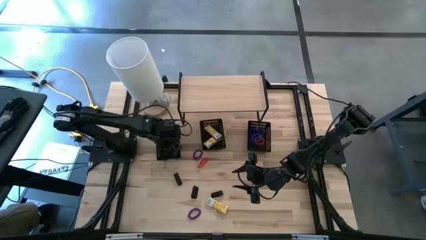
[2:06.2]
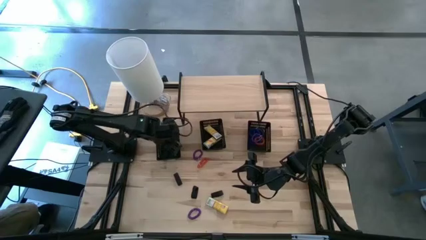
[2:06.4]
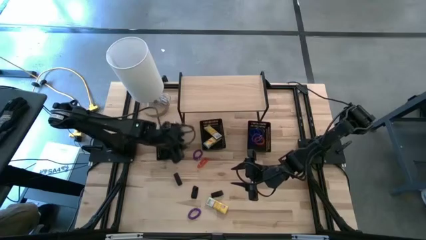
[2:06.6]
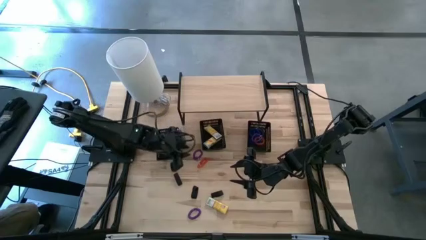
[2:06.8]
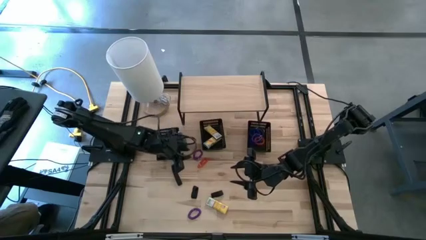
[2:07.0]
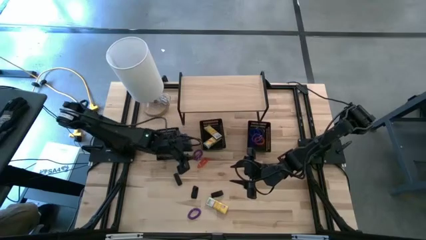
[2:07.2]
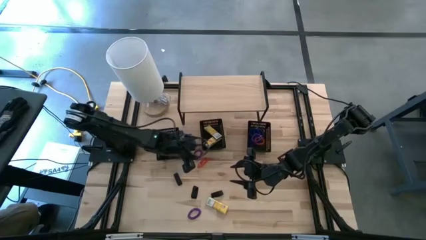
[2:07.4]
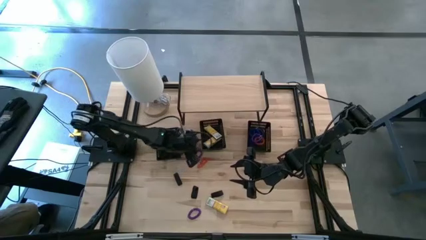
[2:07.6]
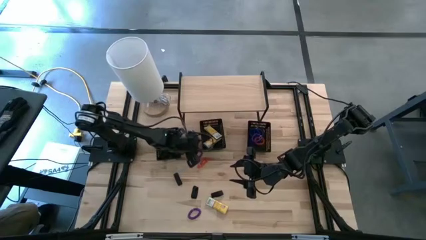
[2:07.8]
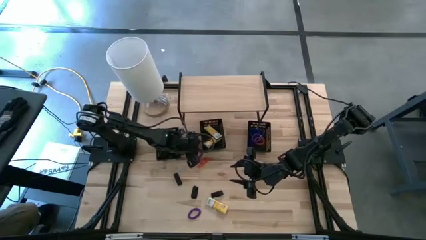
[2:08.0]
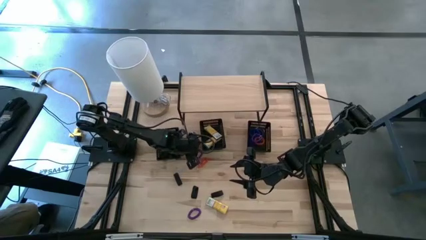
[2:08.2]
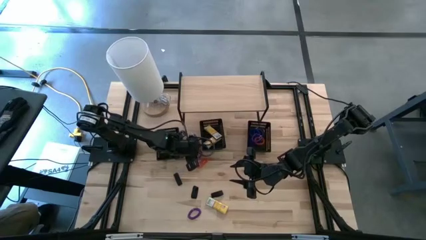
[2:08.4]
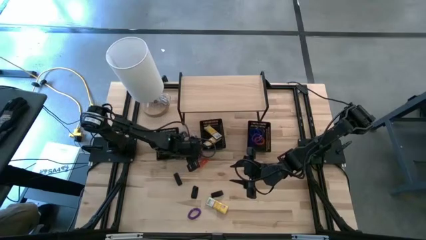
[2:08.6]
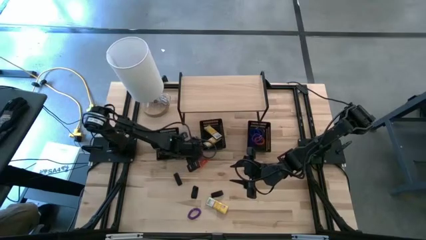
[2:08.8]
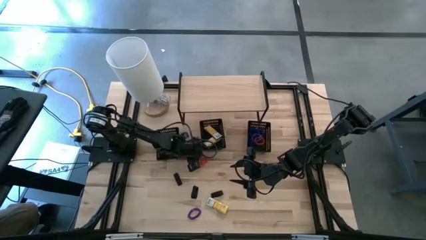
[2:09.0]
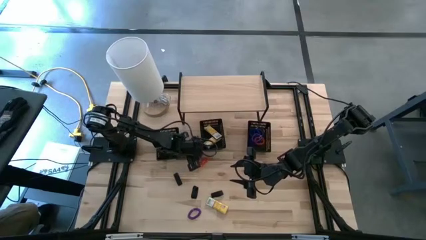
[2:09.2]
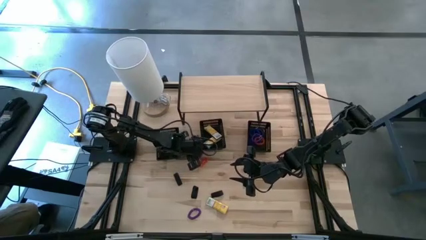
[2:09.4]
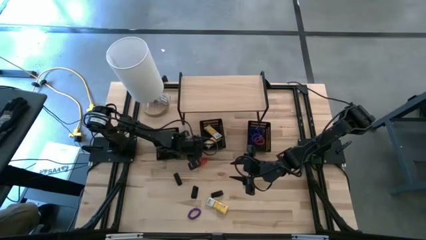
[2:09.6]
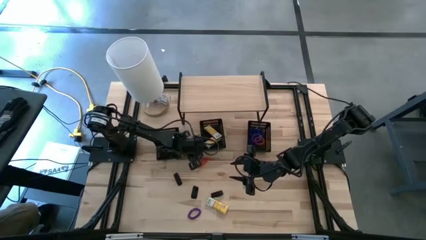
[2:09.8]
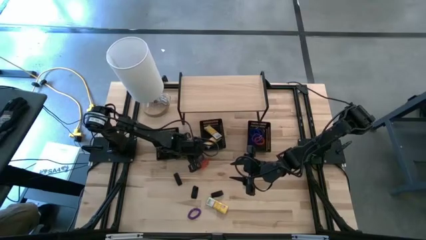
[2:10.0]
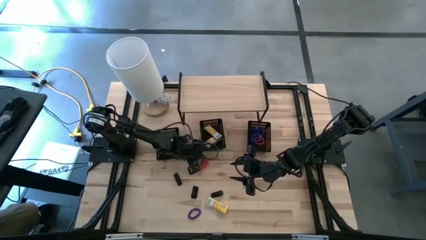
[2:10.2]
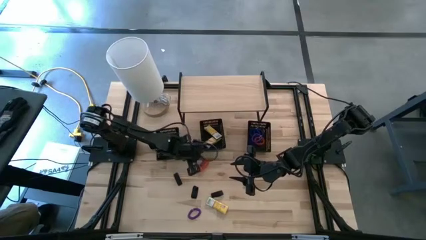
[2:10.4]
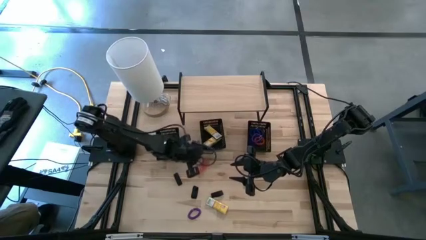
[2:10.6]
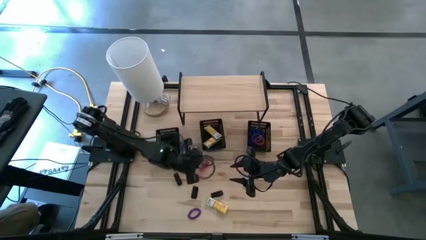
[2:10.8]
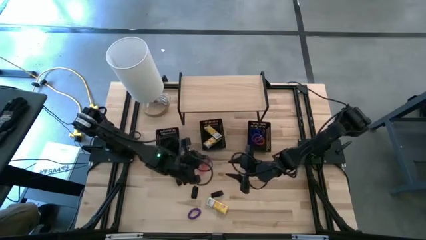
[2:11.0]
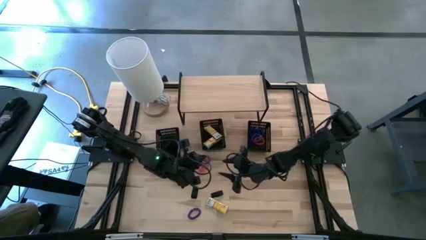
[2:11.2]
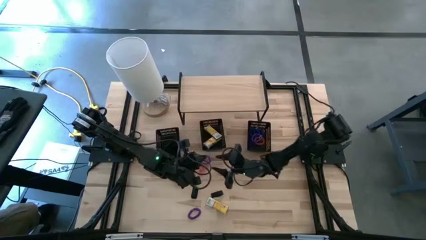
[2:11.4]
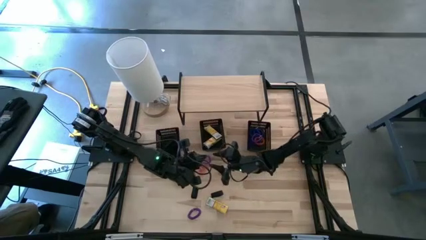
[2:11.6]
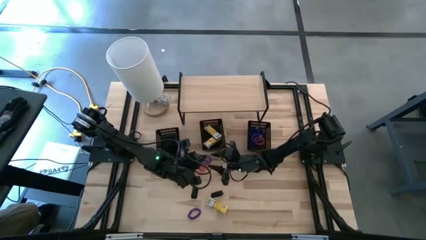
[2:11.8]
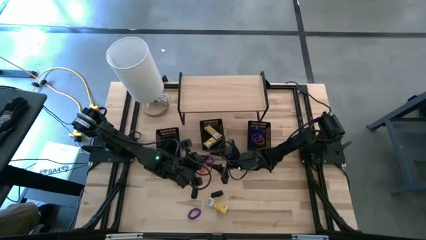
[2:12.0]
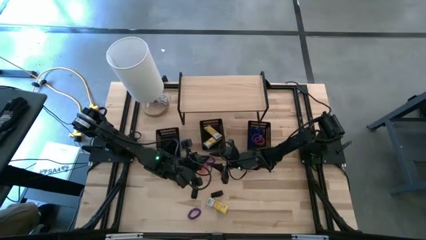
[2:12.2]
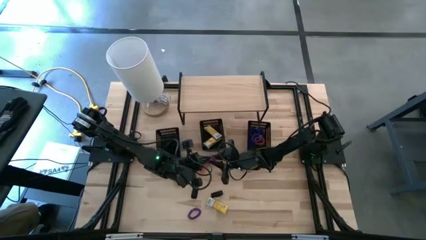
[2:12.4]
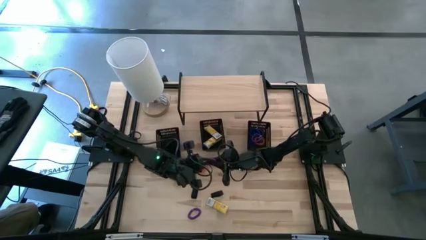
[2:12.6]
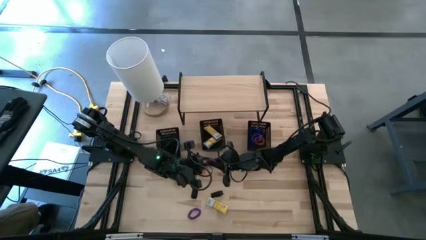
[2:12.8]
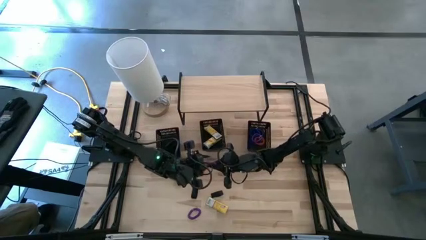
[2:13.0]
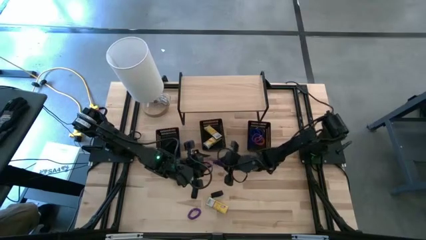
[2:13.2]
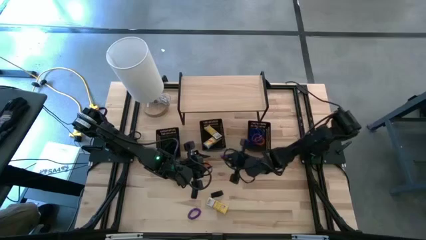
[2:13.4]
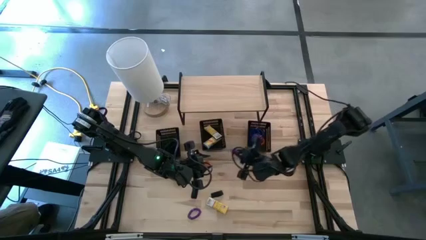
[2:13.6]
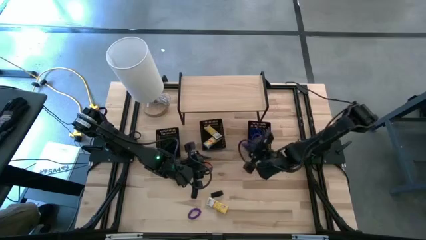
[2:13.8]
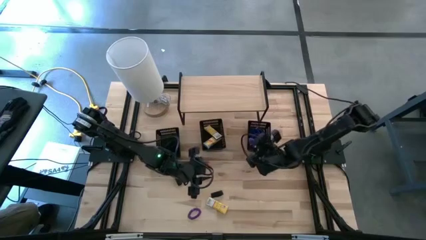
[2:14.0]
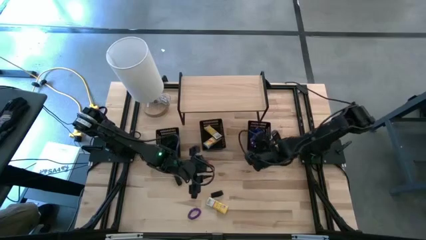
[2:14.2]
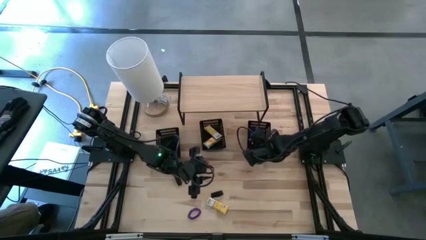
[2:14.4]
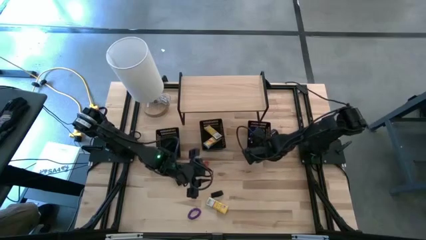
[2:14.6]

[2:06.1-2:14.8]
Task: Pick & Place Office Desk Supplies
Put the purple spring keychain into the right black bin

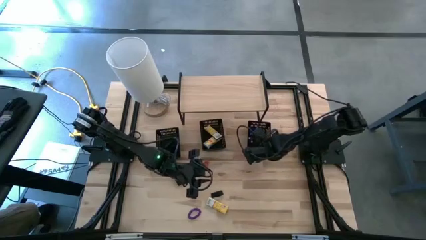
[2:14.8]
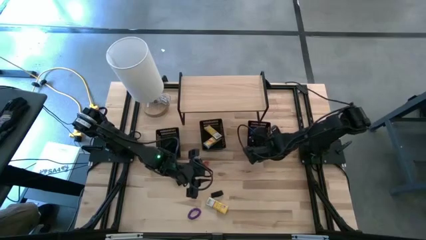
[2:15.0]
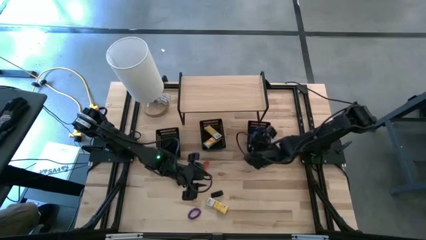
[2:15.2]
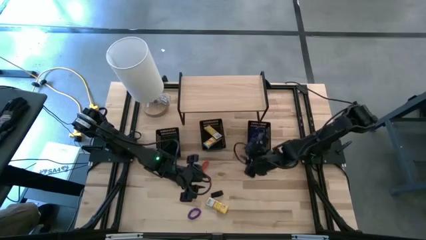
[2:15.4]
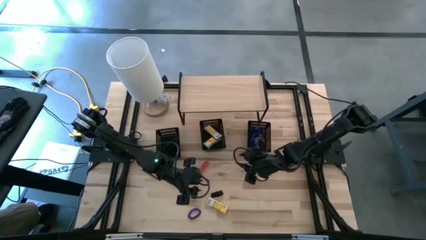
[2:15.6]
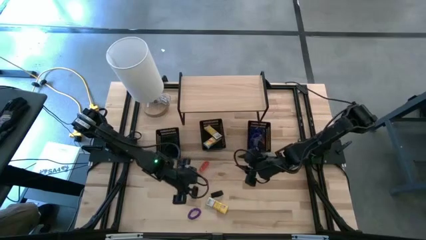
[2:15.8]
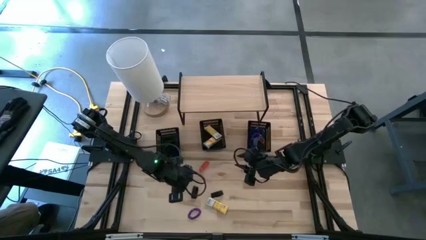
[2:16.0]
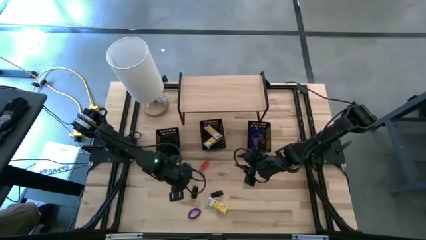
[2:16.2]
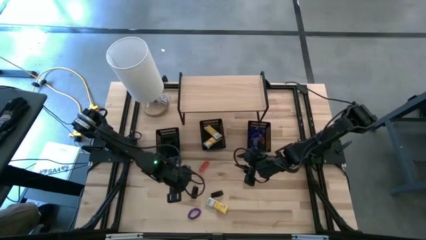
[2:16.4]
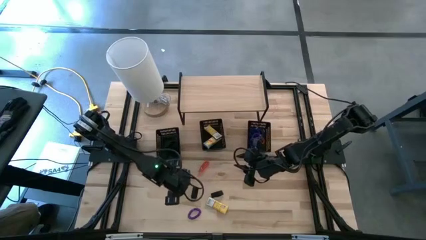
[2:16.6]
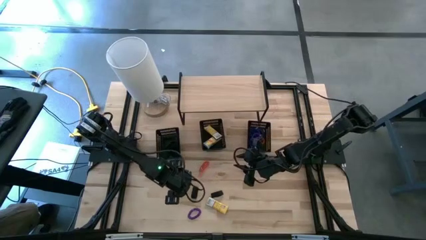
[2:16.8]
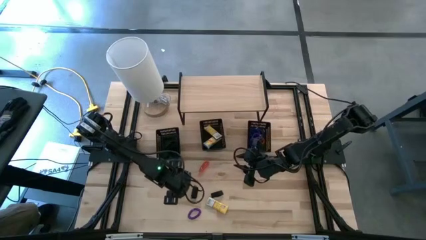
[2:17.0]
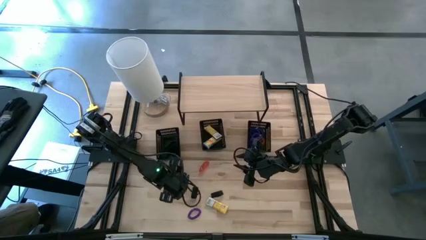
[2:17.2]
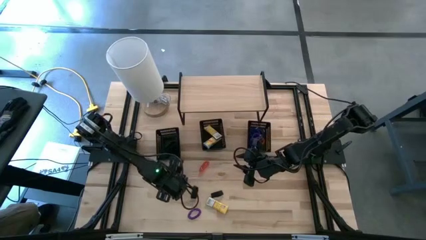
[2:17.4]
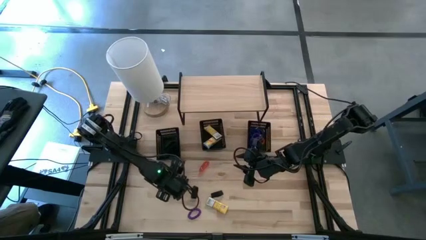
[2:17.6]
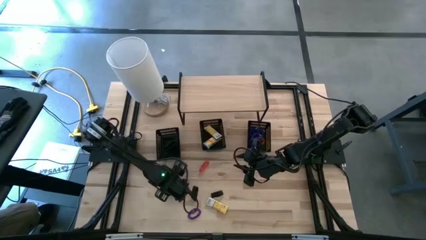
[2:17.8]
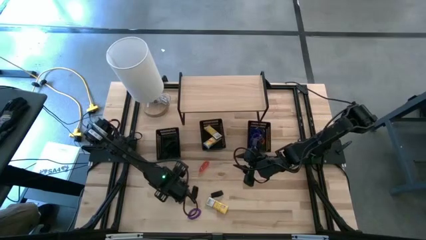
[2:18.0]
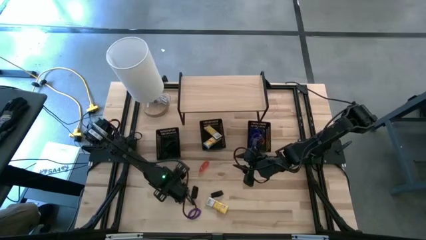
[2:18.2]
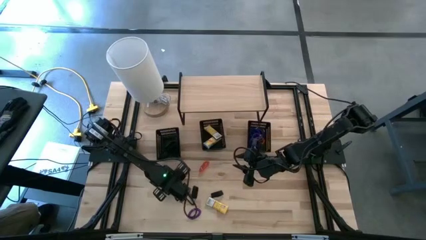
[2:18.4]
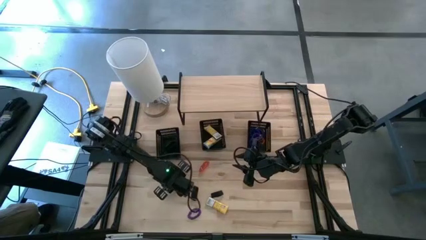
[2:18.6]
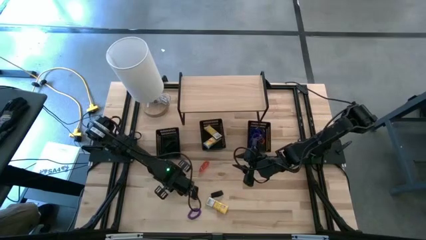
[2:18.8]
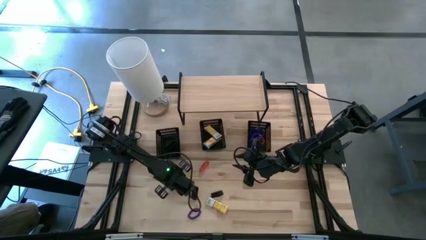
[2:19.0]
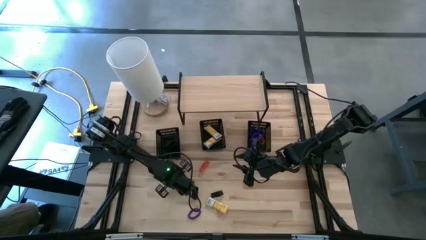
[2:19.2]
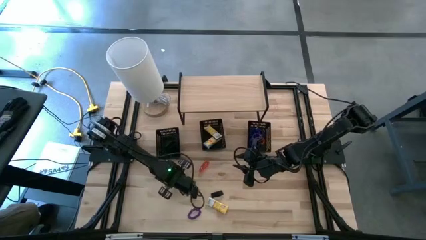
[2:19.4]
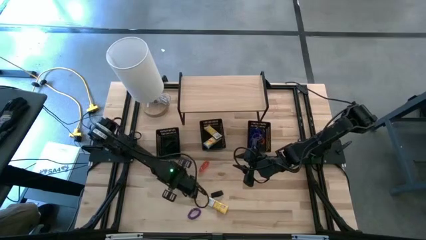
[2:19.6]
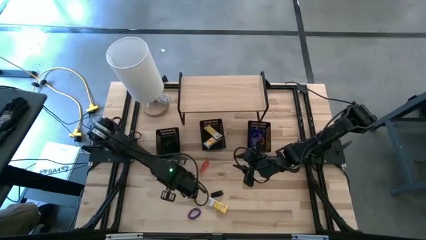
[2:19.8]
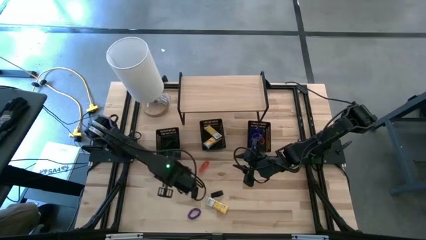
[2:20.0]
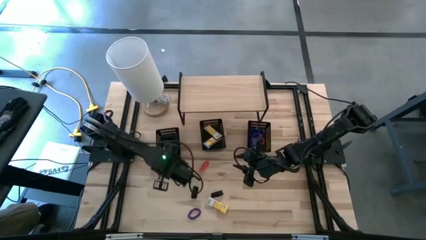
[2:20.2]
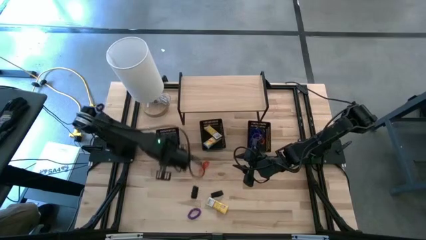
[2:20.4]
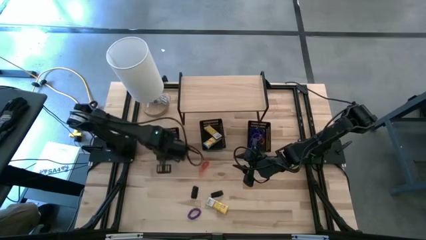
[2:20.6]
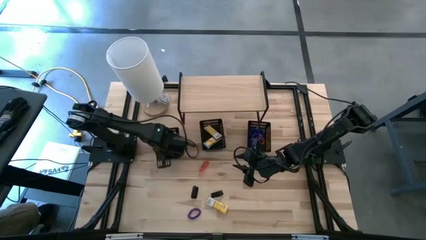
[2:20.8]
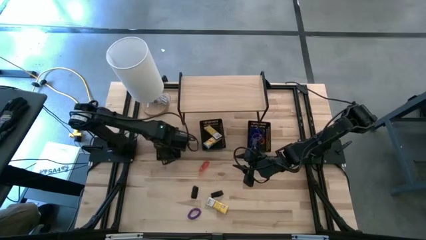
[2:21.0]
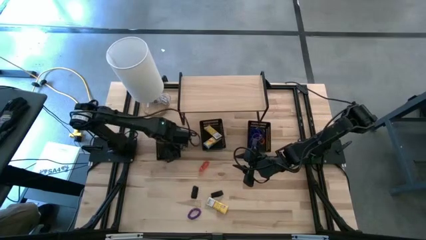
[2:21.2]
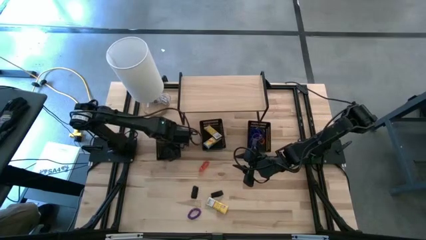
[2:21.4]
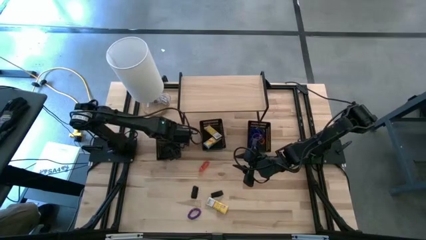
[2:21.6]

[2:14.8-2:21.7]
Put the black rubber band into the left black bin

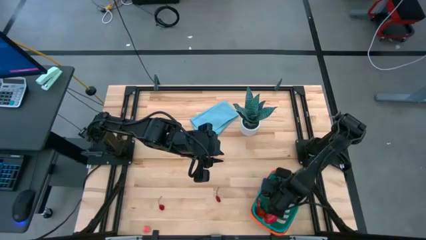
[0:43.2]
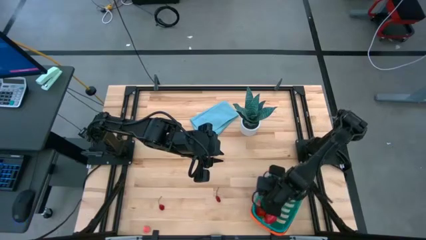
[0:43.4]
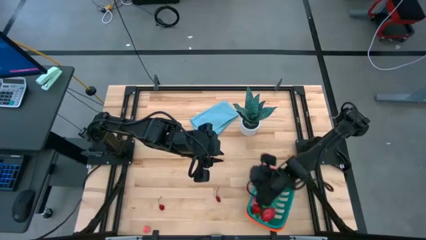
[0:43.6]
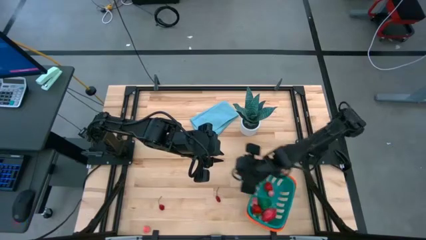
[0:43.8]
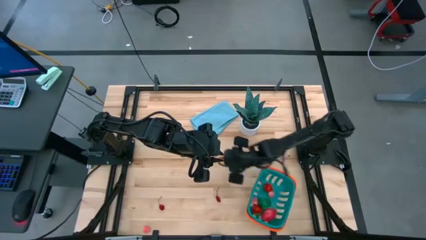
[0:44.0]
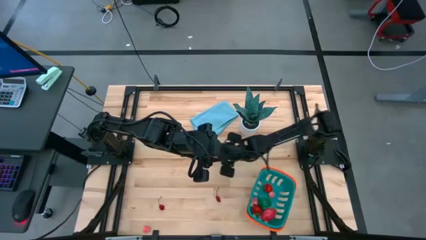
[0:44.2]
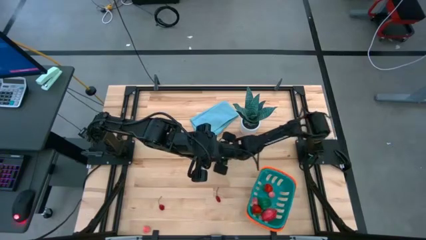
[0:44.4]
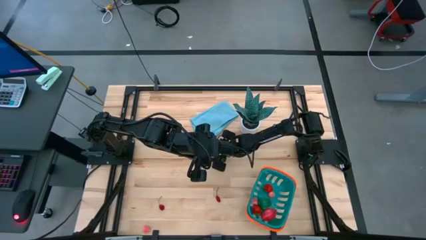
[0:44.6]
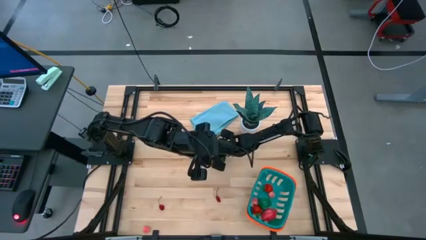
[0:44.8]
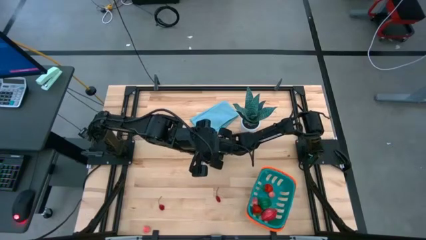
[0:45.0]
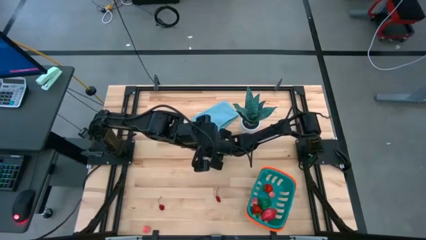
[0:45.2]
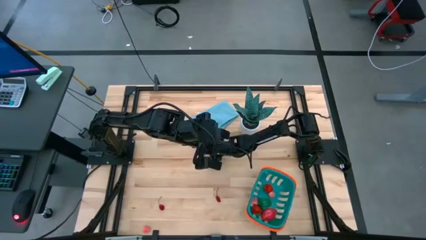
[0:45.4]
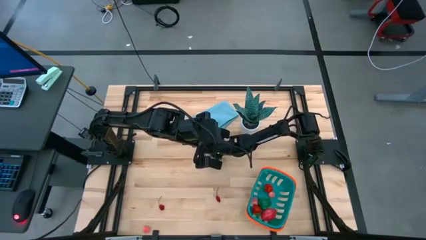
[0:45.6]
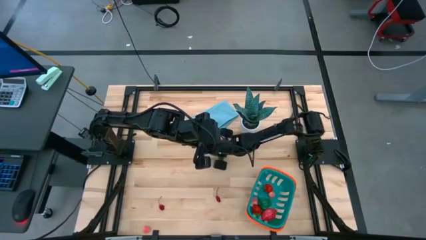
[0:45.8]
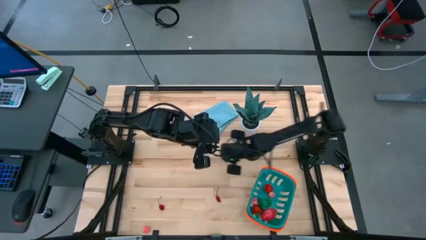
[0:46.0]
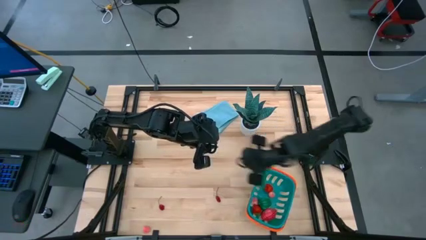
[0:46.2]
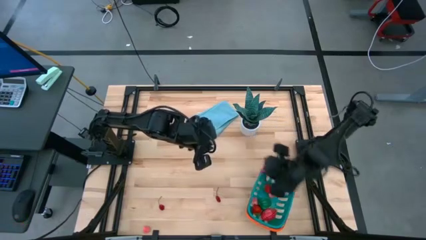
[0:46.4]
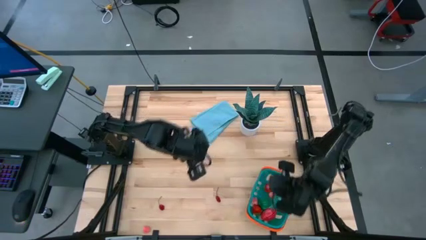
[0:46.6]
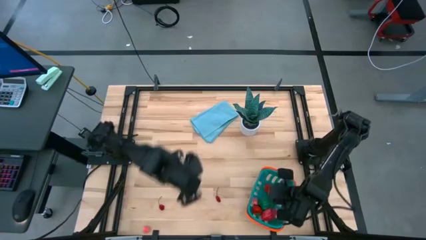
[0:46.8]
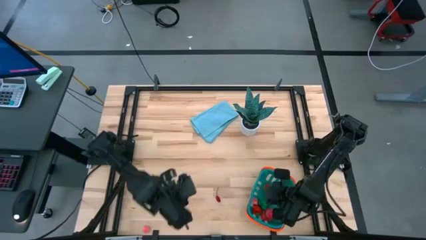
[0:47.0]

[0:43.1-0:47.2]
Task: Pick and placing Produce into tupperware
Put the top apricot into the basket
